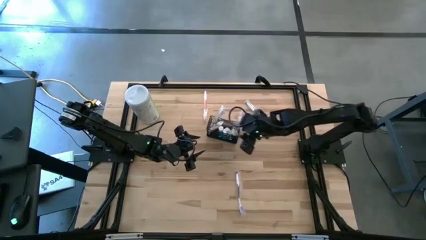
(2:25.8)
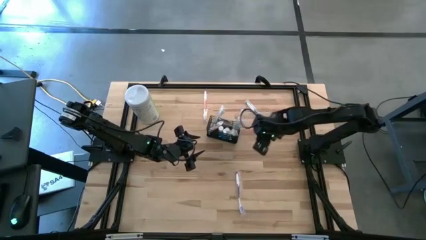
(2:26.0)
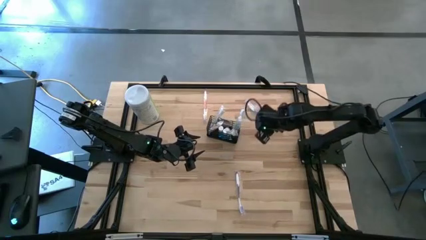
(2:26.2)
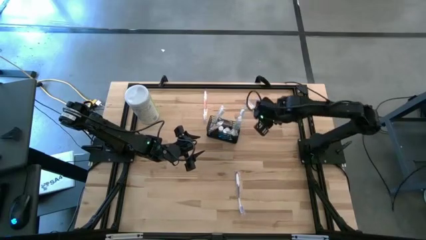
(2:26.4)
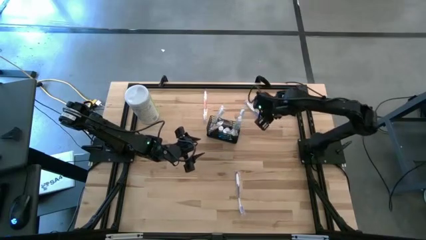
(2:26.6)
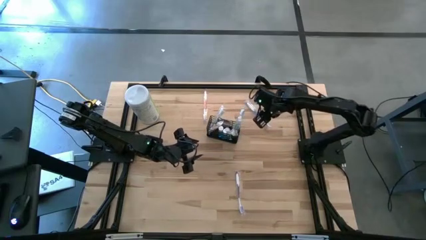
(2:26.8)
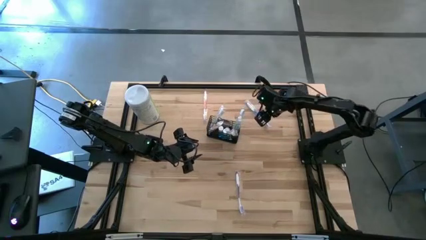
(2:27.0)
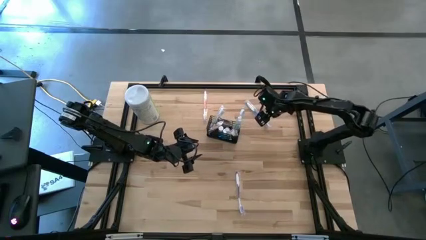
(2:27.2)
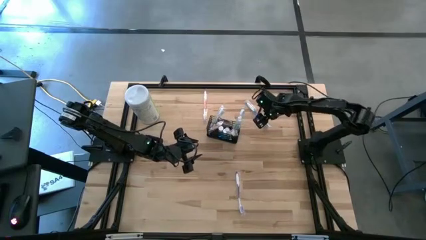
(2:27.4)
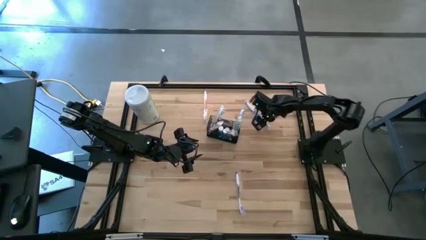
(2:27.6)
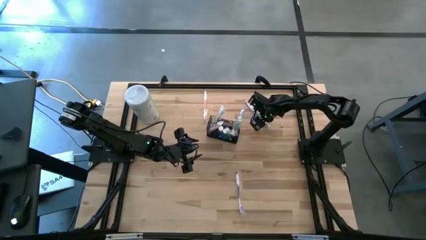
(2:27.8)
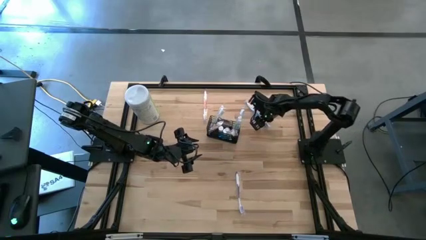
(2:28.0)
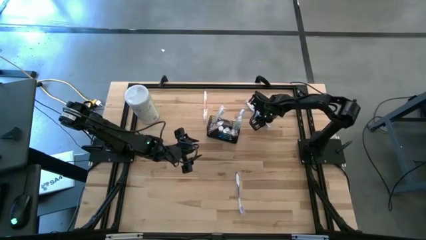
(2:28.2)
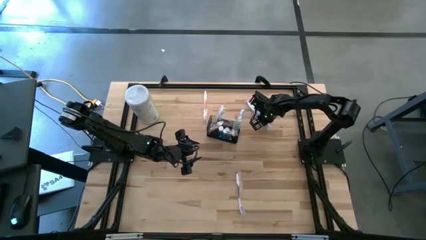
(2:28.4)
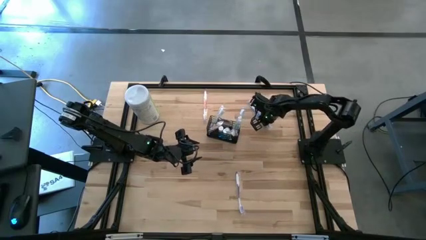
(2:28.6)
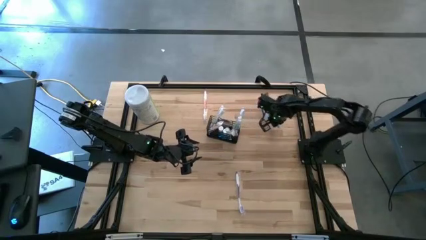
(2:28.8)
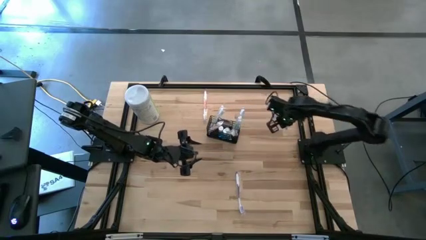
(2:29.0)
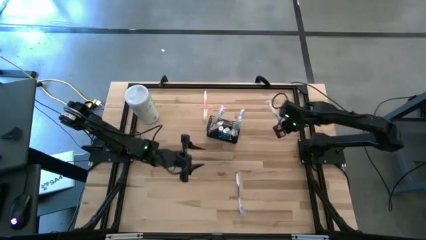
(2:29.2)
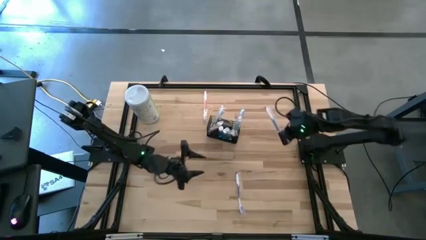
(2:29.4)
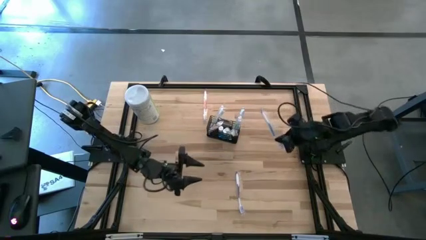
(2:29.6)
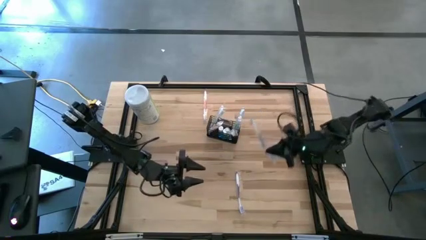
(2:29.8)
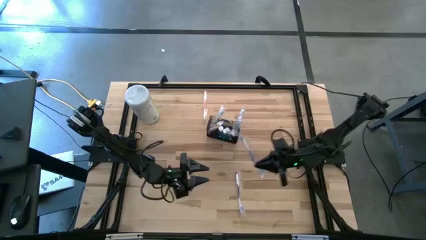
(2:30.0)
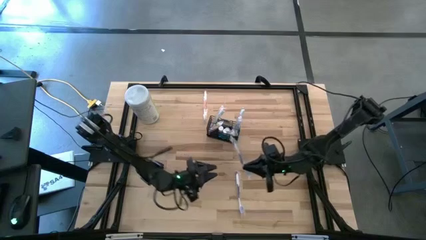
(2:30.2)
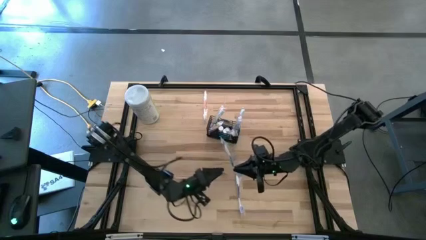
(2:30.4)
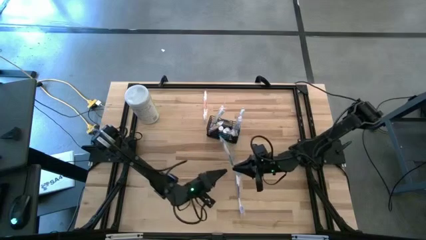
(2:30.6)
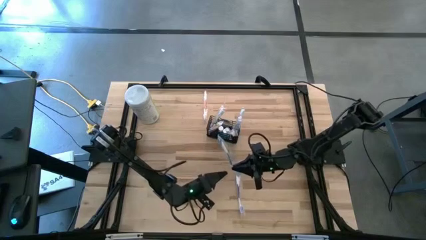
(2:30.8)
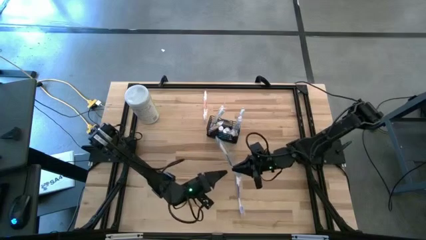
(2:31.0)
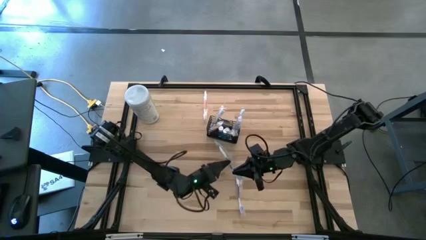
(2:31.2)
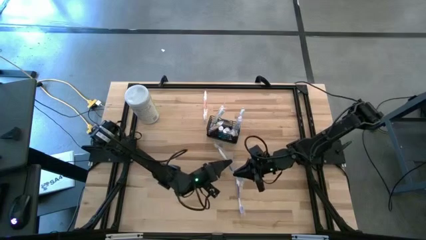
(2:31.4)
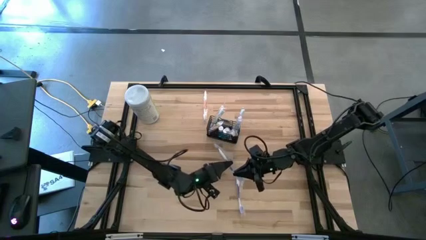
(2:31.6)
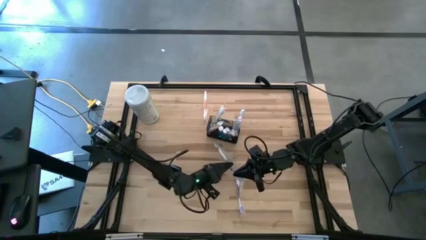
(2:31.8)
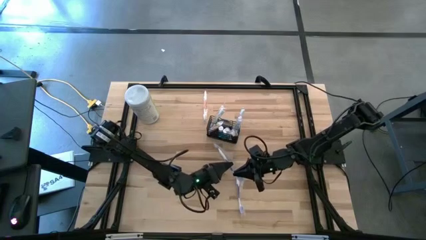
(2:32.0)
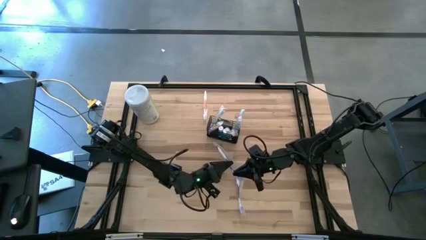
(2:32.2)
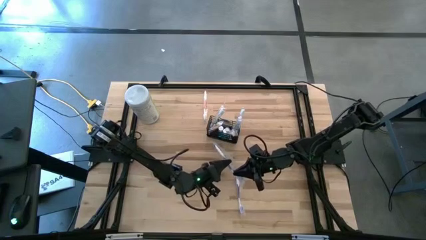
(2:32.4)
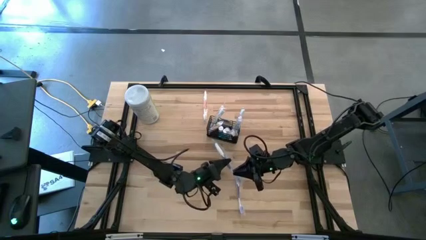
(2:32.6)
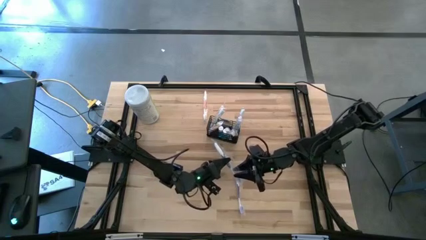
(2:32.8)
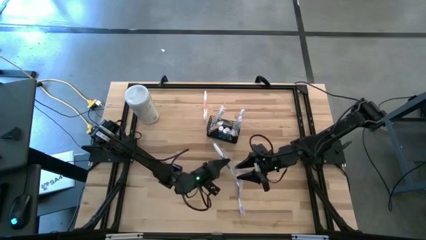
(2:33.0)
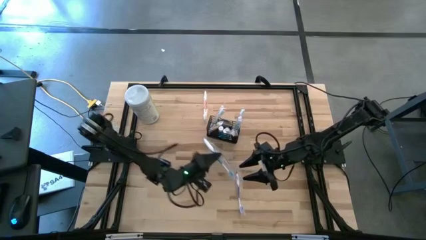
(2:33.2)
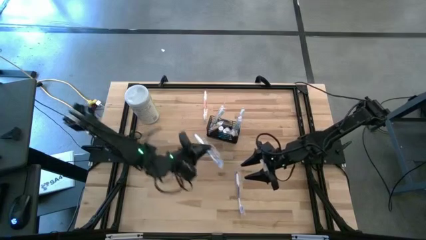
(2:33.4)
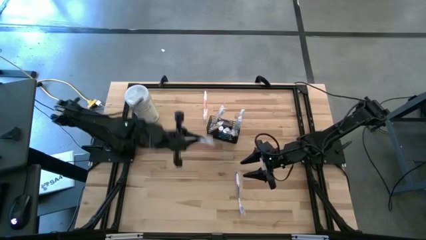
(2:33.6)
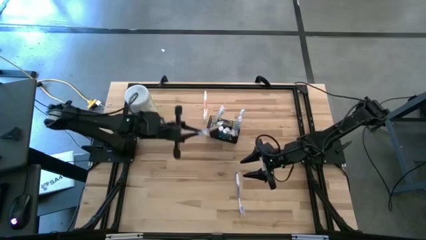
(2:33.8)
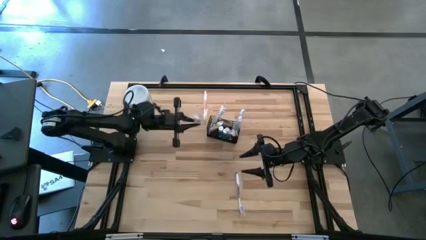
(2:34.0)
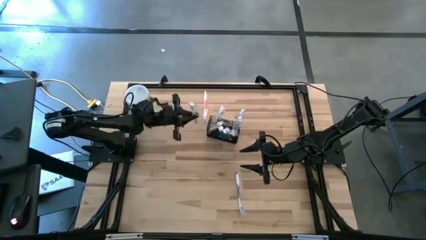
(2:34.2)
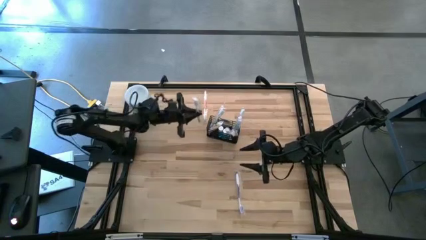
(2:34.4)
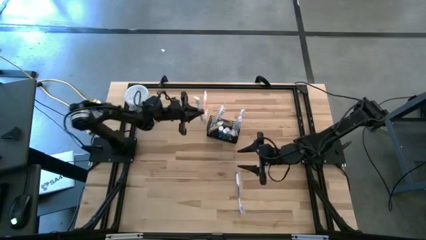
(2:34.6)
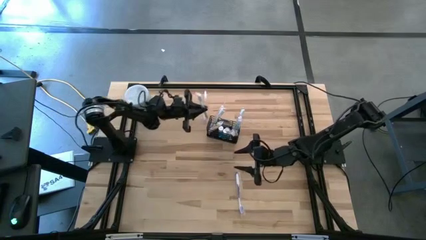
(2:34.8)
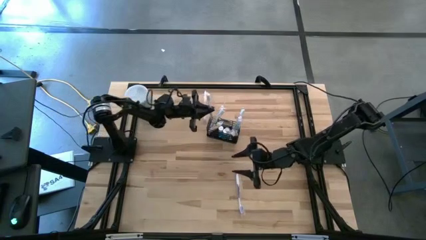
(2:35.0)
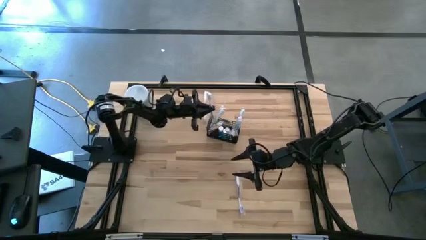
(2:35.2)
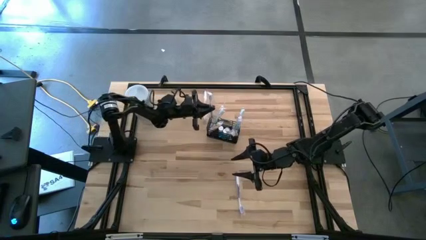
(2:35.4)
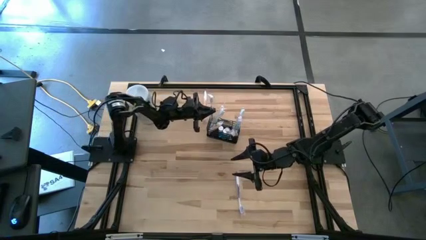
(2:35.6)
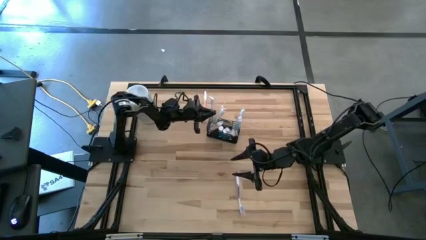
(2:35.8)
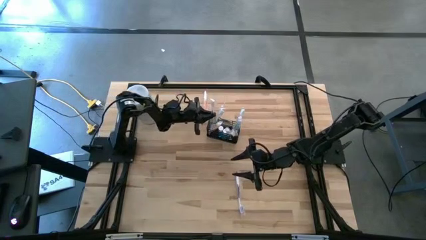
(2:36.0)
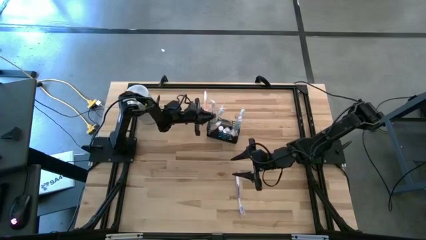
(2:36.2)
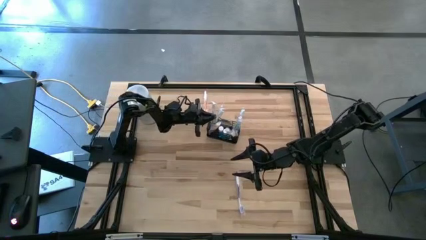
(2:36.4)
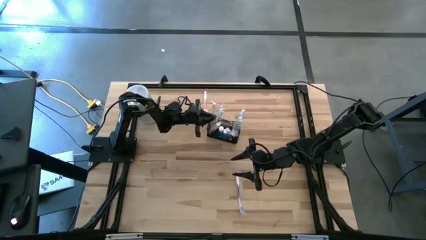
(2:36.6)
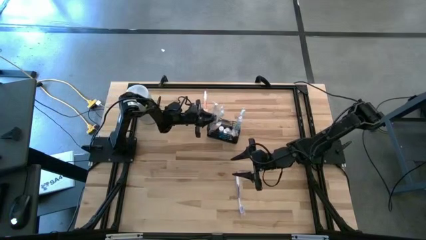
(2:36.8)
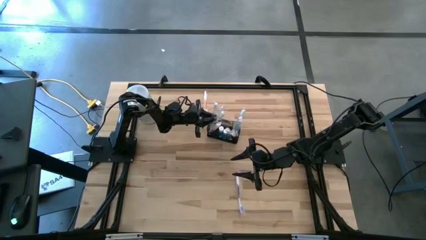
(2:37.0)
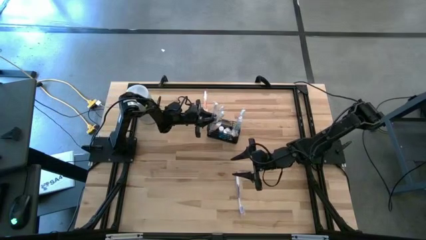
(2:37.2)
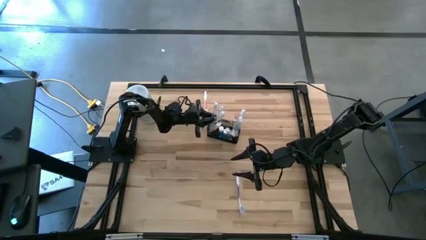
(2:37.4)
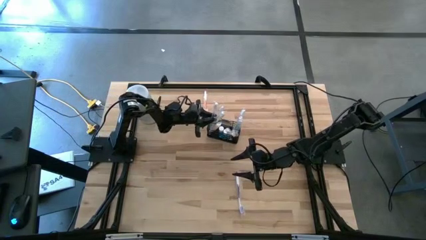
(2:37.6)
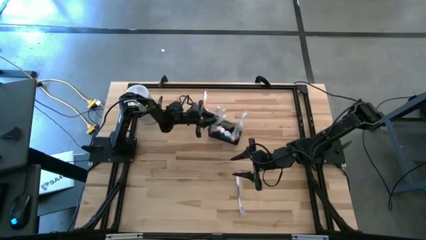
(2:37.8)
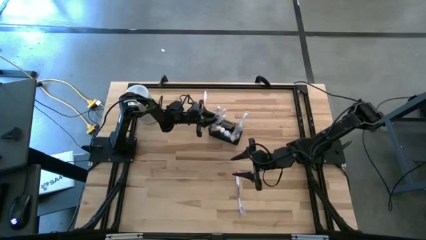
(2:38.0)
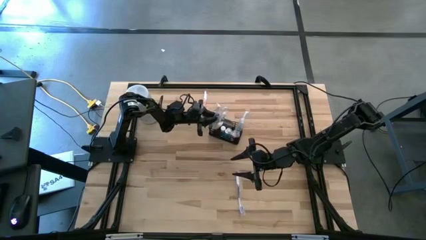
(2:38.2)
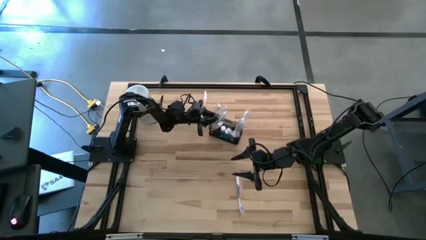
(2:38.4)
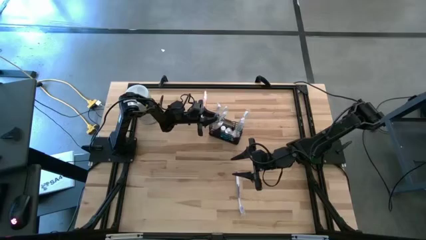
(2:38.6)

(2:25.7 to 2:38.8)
Task: Pick & Place toothbrushing station
Put the blue toothbrush into the mesh organizer

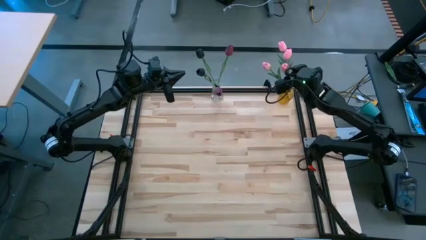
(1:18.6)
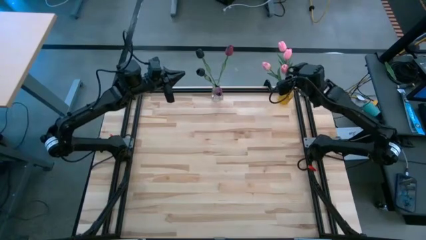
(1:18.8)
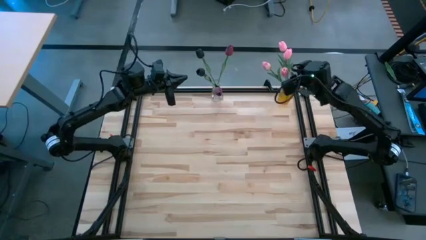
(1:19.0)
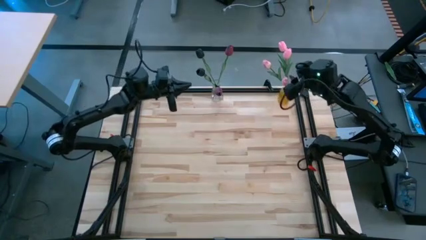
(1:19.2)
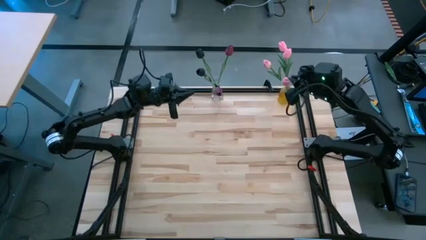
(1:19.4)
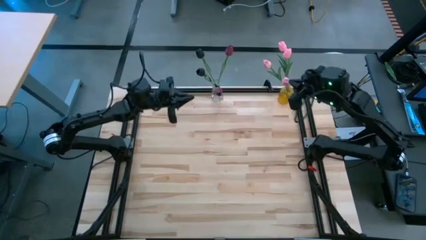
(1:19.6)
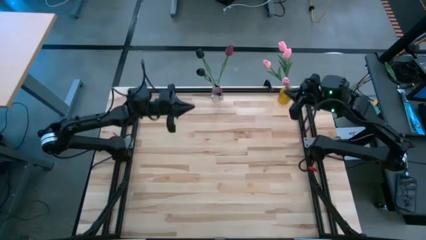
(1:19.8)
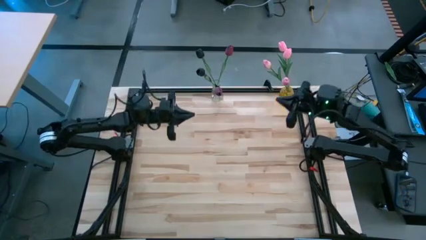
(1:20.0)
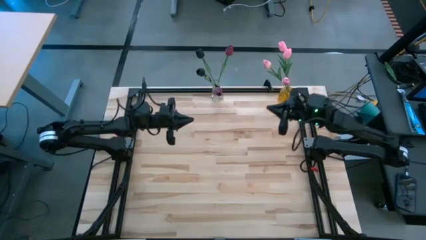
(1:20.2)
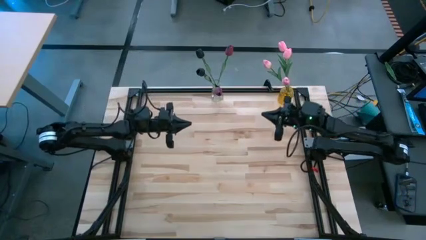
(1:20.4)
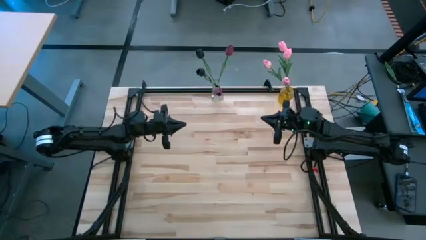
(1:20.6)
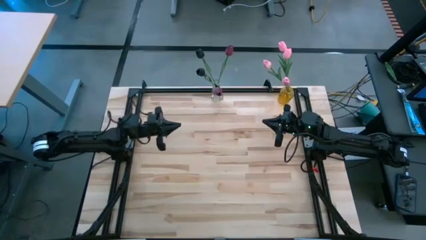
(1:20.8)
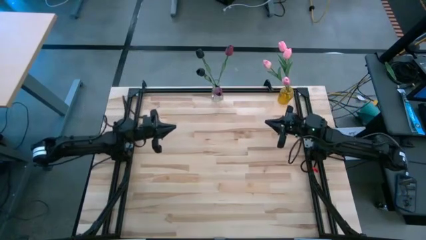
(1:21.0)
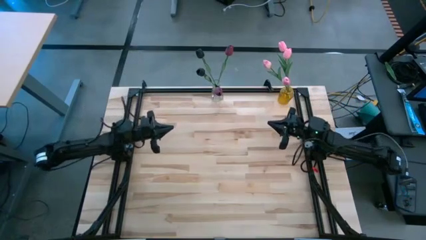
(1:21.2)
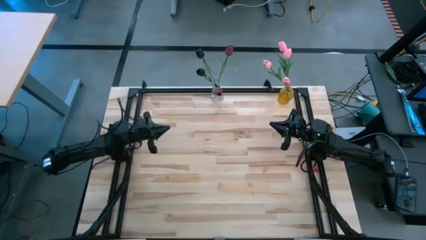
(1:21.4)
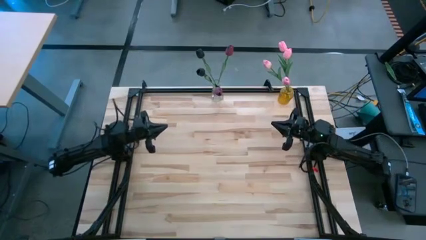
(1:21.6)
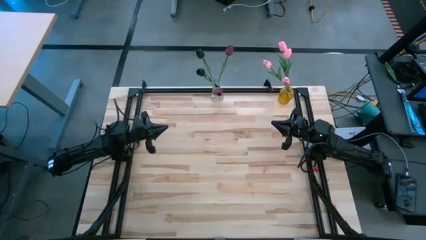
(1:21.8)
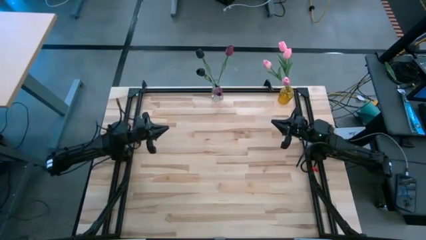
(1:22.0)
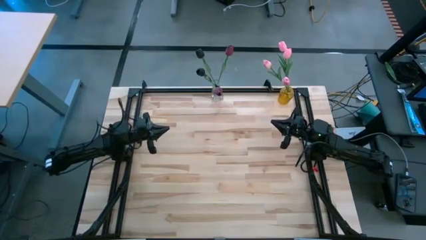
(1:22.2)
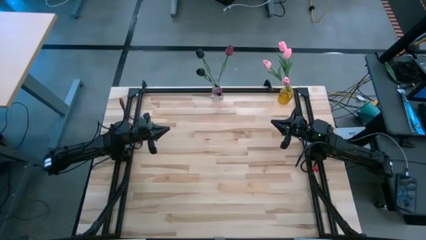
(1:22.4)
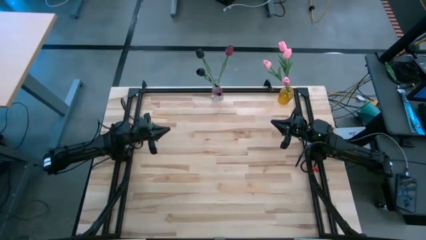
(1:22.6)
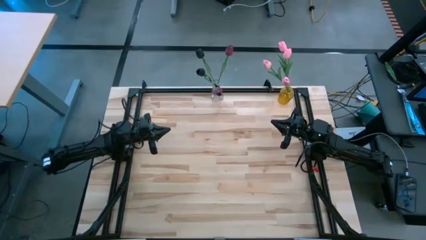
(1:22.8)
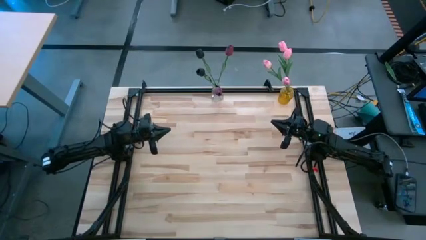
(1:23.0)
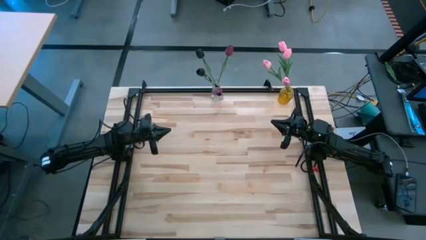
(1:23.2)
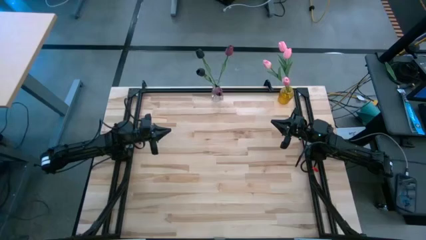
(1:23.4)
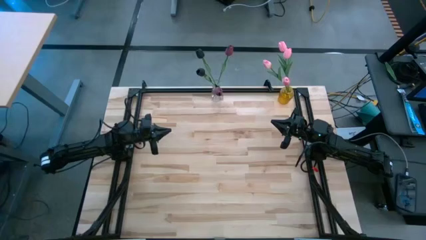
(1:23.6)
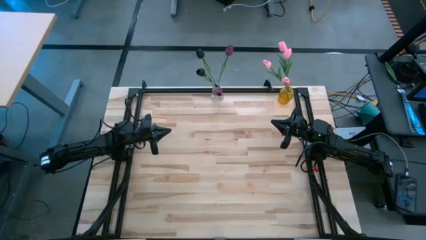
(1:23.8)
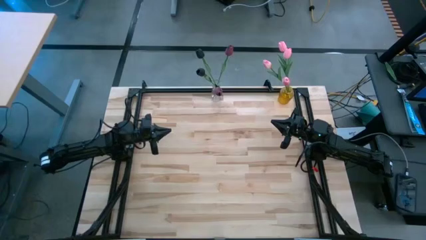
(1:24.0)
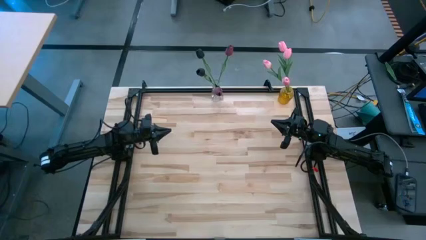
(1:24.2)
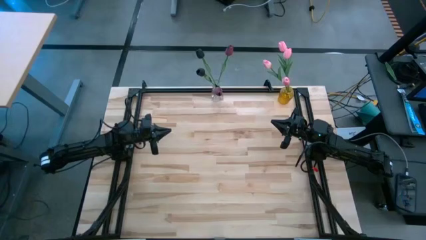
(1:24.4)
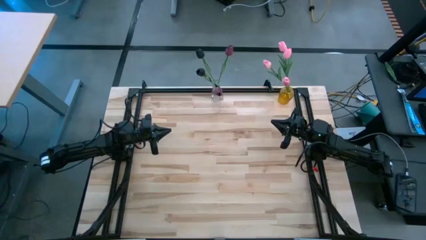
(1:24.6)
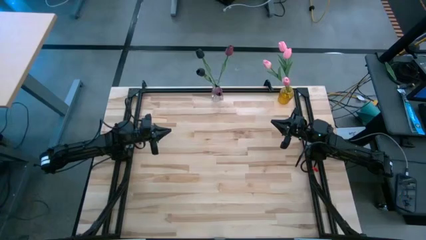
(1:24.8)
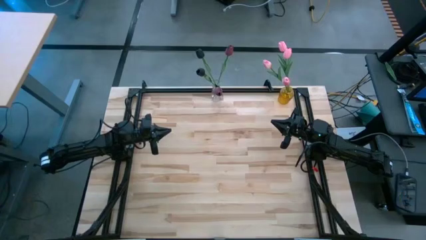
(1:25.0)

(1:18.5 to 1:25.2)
Task: Sort flowers into vase by color
Return to Home Position
